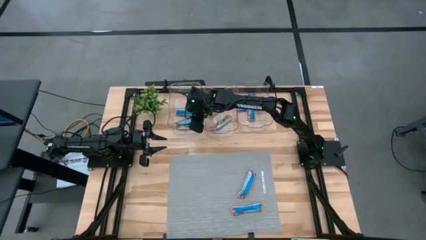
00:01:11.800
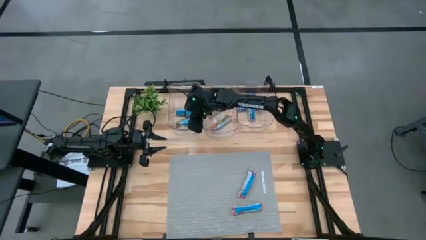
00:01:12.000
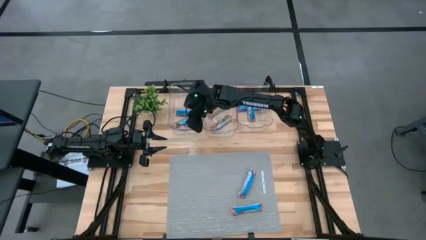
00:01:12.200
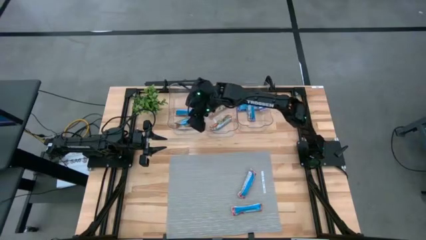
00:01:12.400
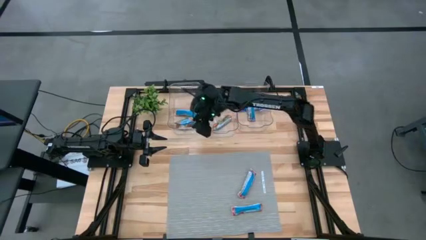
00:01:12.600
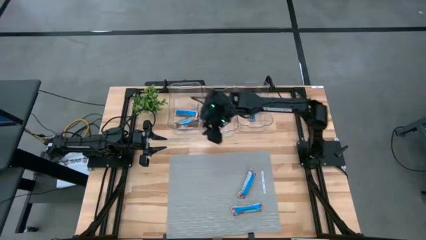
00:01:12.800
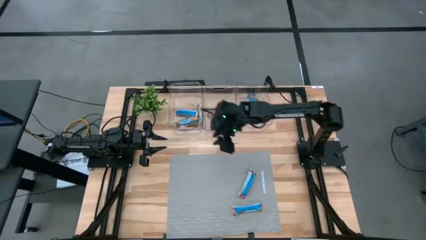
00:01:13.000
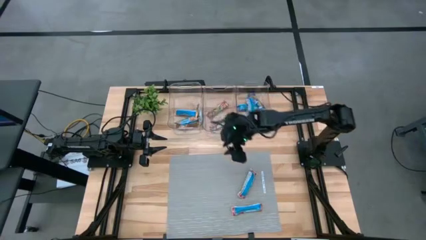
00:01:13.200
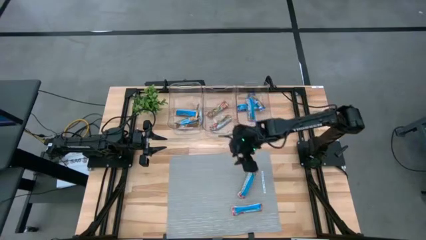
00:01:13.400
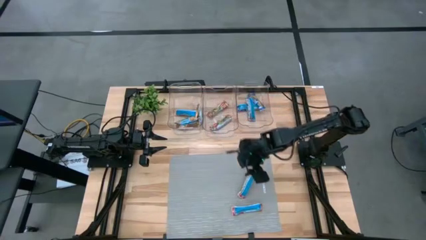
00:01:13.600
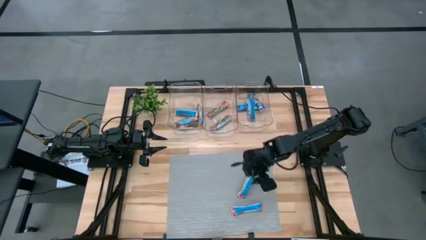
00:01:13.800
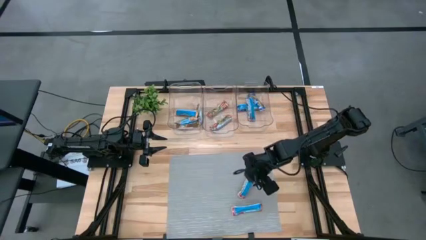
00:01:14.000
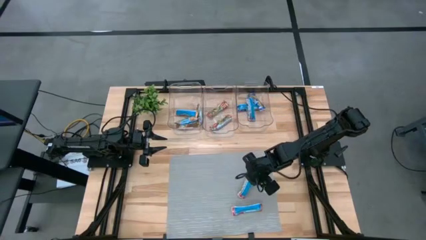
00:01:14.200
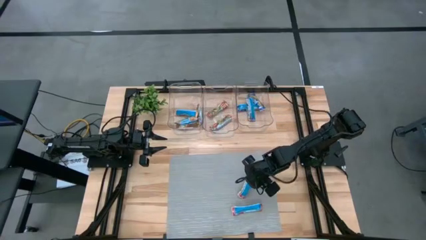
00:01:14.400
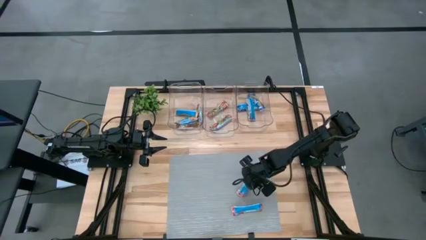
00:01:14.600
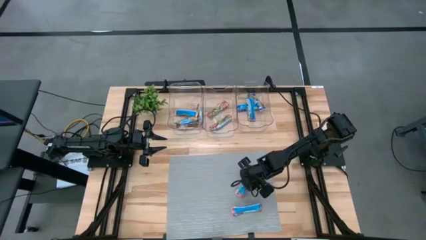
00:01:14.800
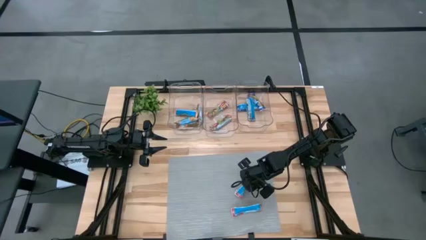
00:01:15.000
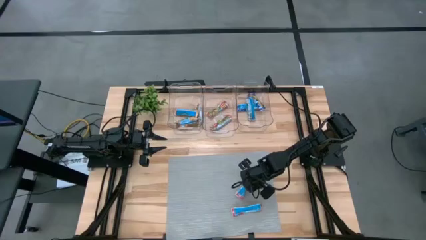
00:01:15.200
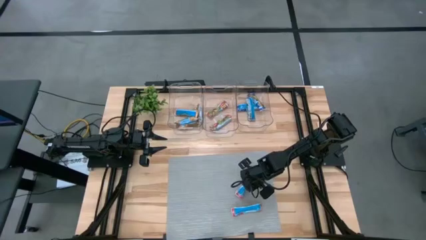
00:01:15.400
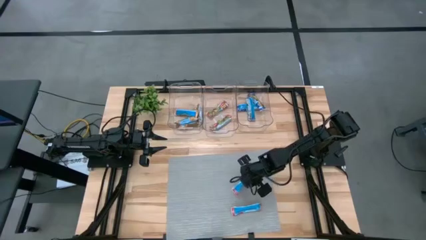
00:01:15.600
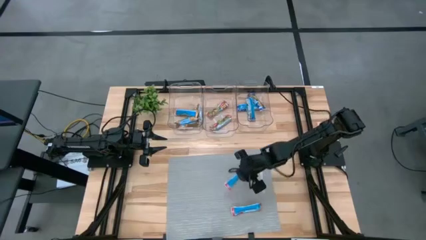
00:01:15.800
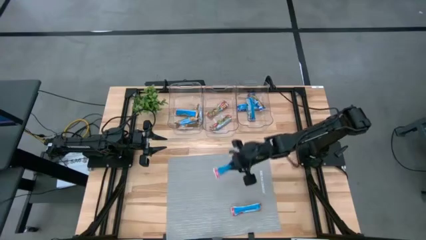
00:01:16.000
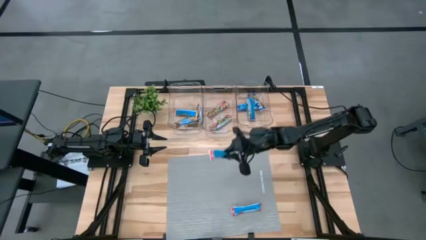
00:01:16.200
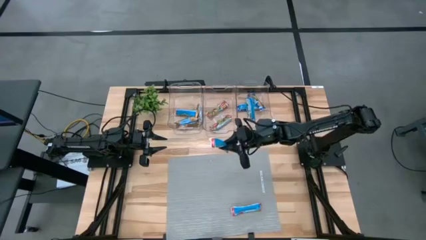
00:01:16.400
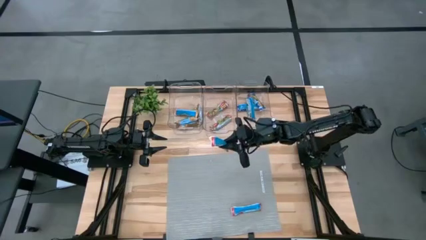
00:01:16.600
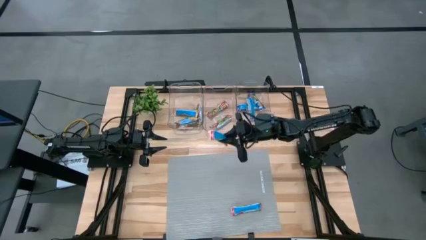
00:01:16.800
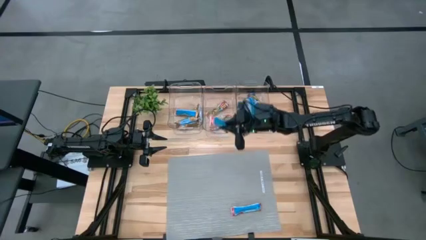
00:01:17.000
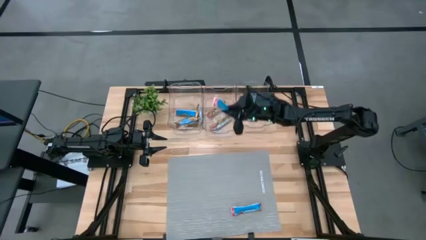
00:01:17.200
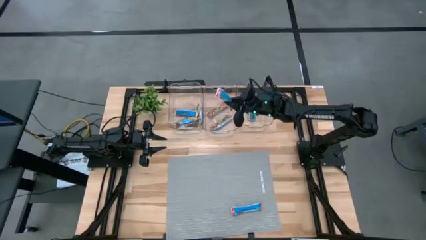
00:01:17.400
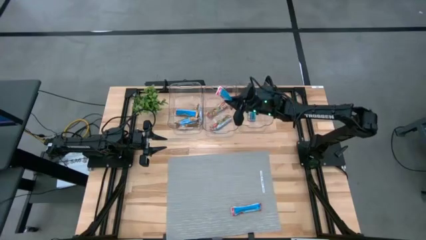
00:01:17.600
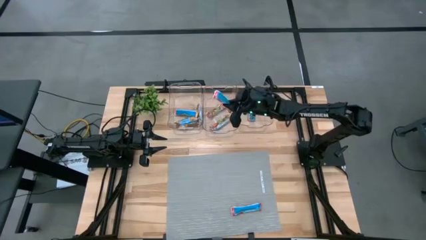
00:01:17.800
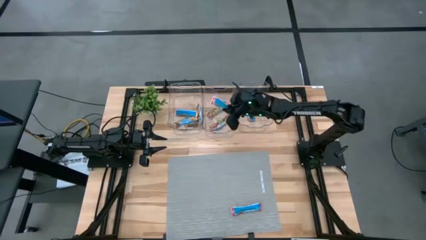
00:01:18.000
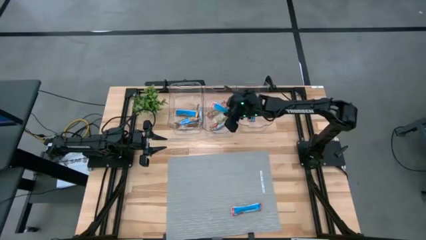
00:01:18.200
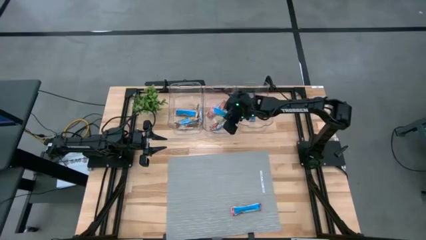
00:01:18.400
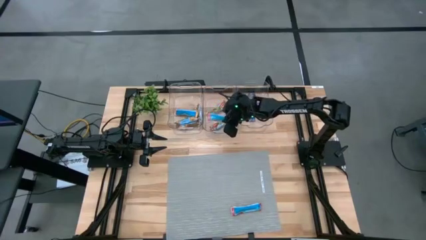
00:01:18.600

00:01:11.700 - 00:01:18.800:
Task: Pick and place Granola Bars by type
Put the red granola bar into the middle transparent bin

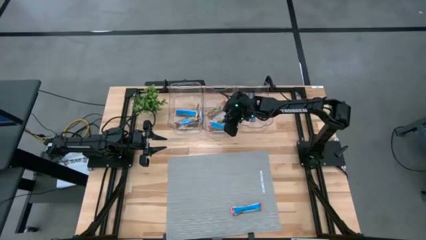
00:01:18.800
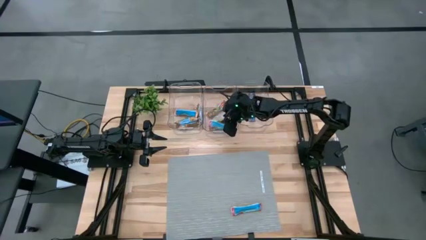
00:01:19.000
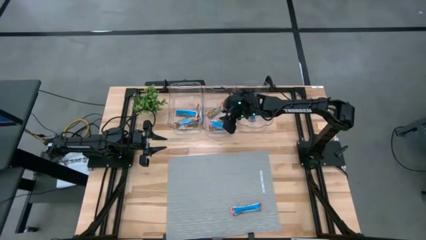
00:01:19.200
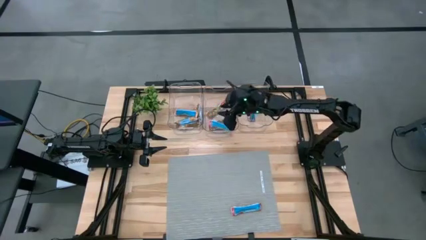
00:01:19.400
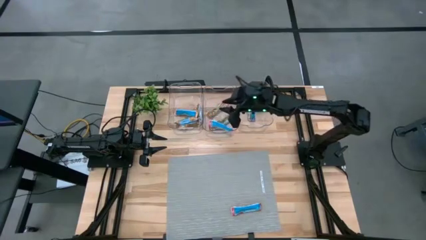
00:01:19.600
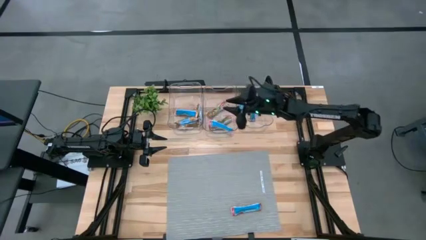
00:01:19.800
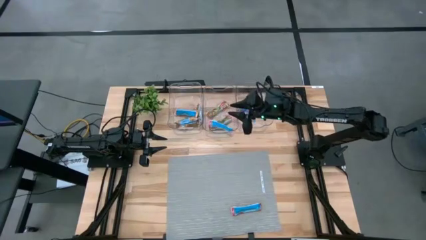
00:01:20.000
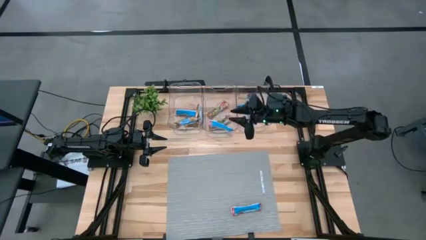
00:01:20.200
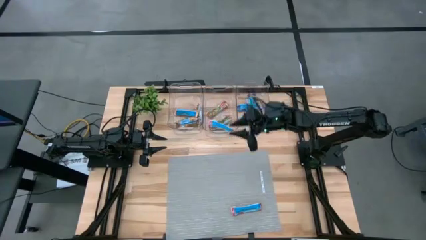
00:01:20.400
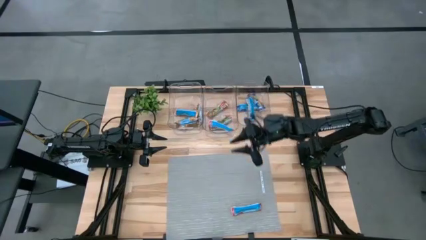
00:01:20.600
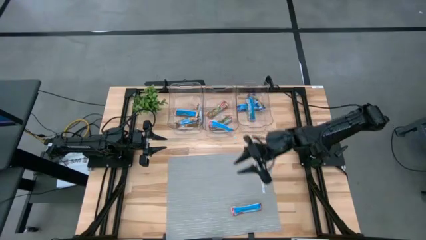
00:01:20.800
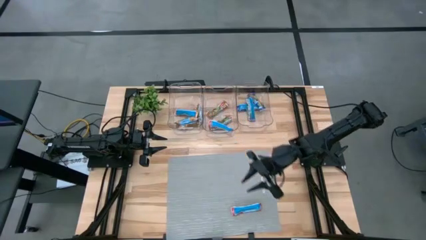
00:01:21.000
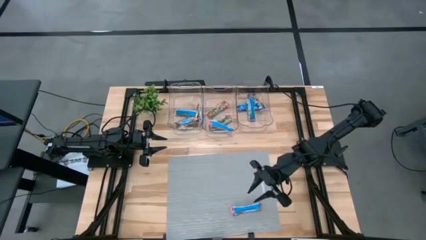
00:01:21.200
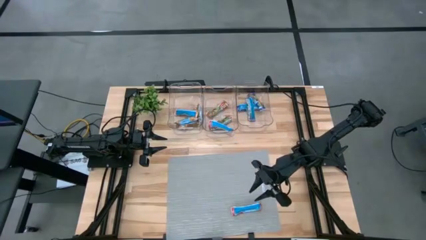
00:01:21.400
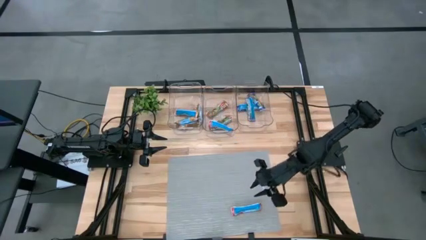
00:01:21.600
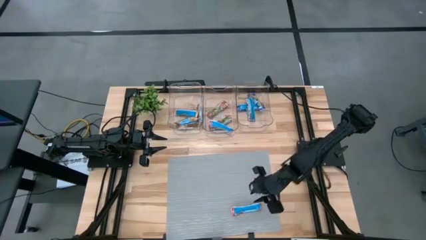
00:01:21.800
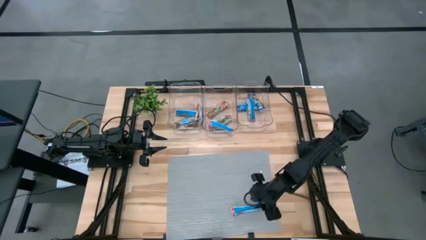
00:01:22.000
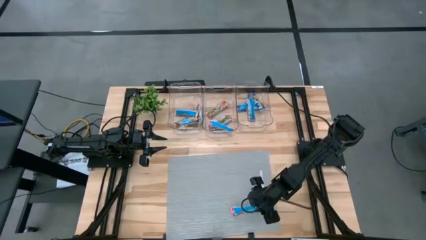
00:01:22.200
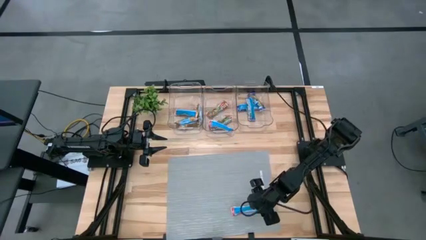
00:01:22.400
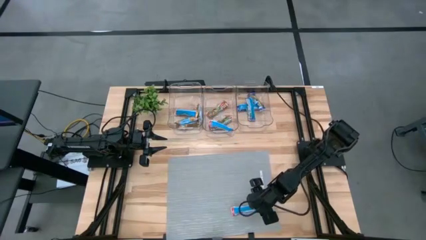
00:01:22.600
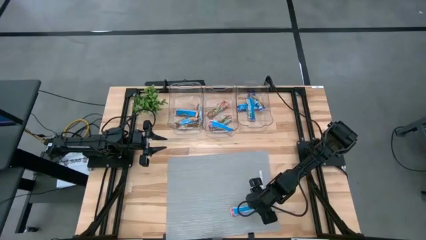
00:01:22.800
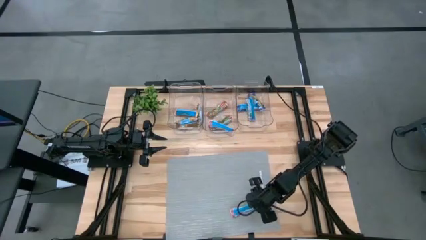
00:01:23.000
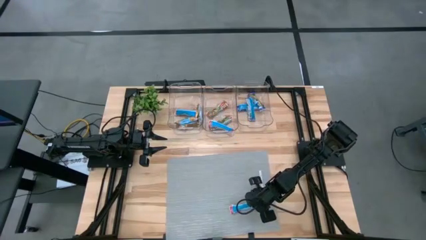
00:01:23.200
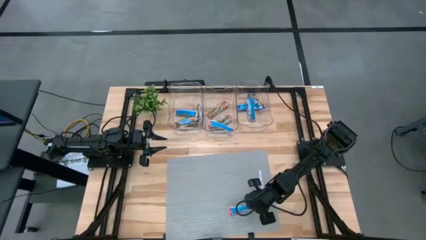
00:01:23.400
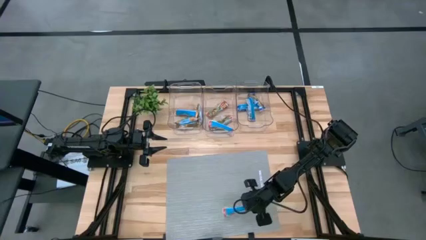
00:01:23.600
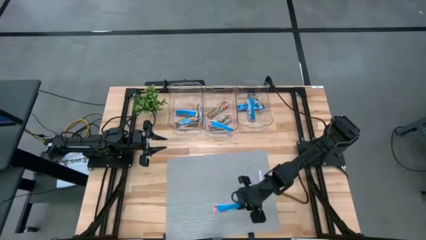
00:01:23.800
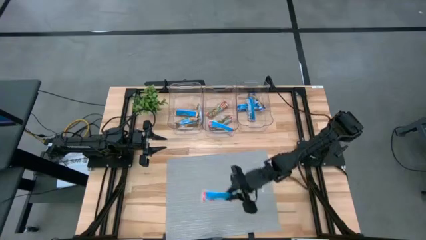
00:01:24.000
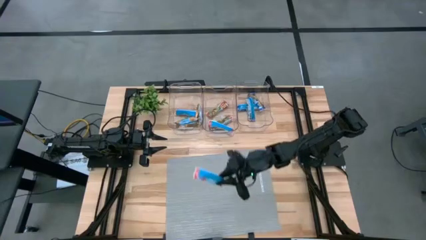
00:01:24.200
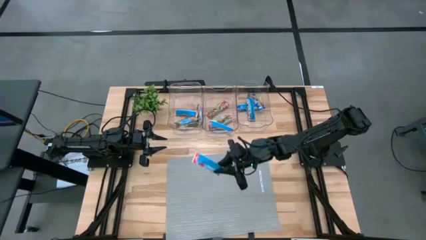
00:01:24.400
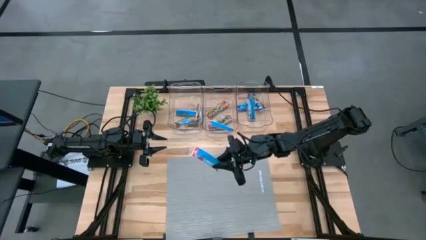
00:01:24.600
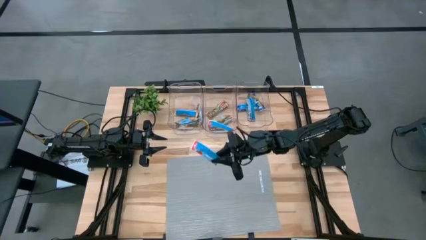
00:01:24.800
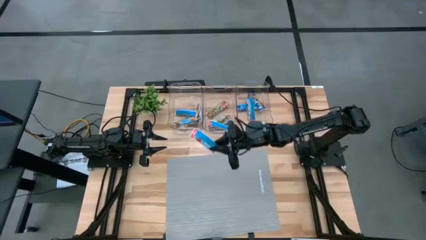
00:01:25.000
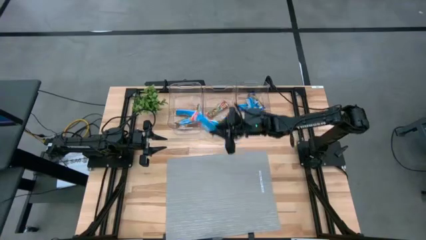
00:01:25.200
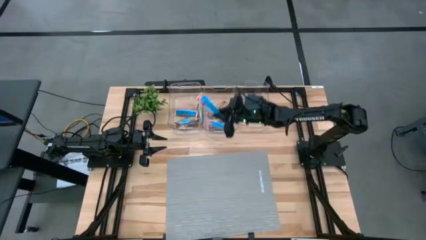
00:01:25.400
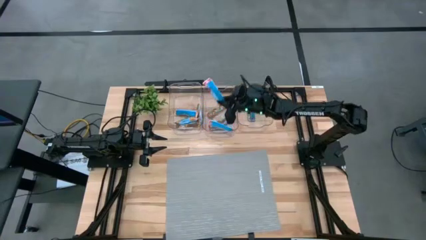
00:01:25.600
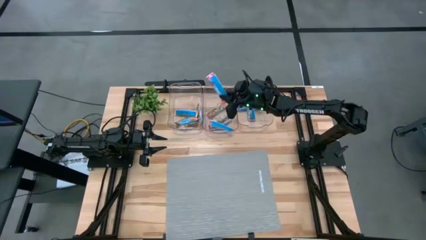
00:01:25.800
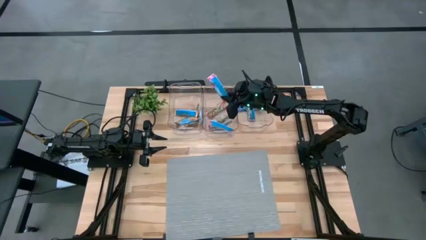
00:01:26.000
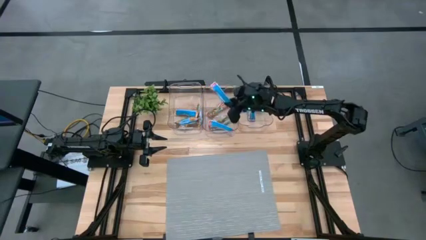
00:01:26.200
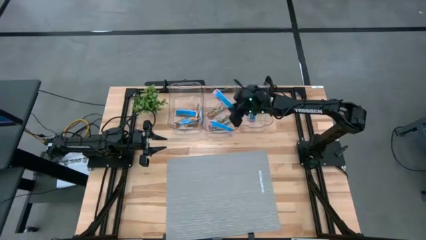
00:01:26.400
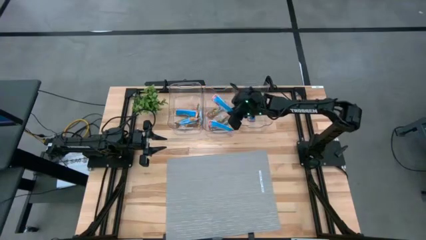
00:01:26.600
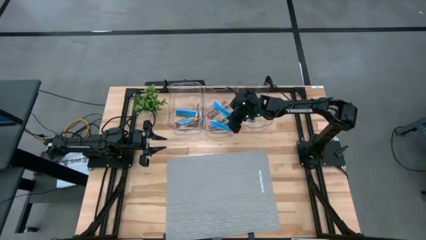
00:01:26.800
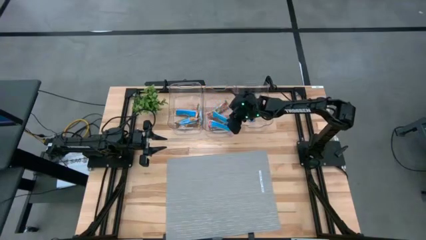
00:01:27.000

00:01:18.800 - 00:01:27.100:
Put the red granola bar into the middle transparent bin
